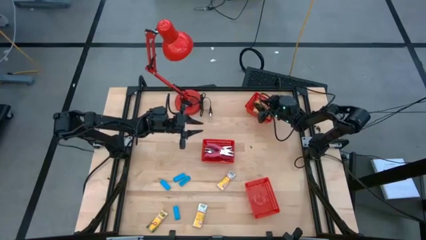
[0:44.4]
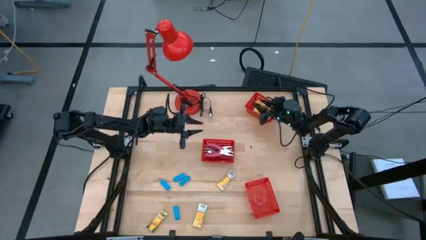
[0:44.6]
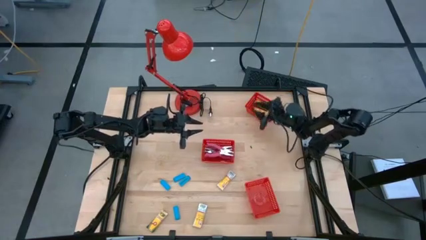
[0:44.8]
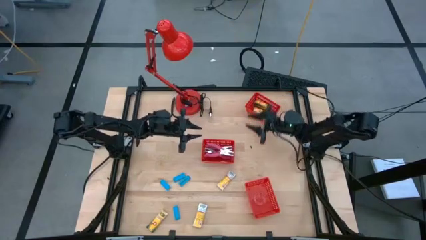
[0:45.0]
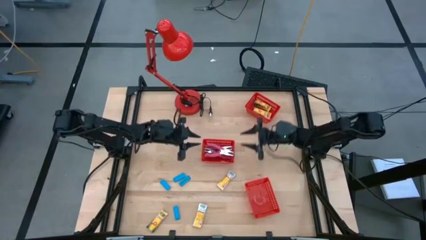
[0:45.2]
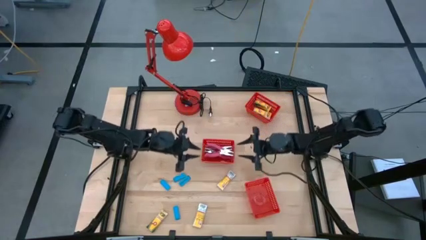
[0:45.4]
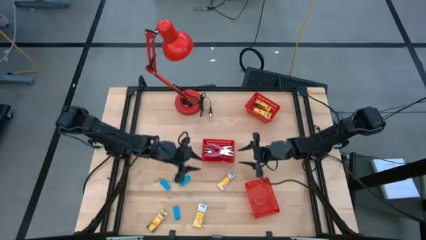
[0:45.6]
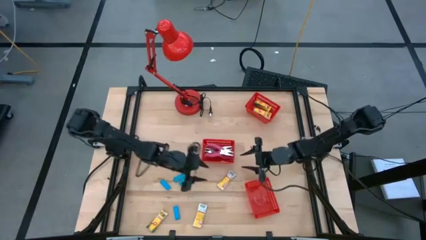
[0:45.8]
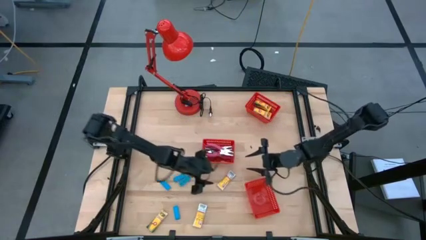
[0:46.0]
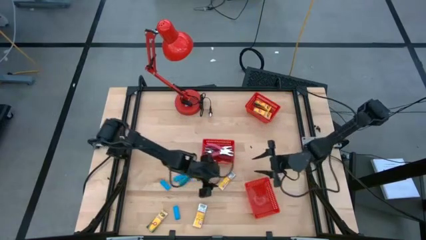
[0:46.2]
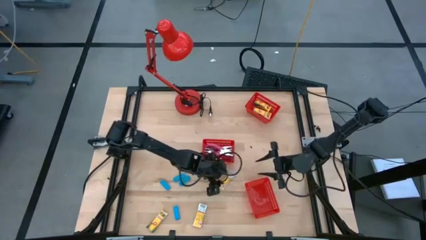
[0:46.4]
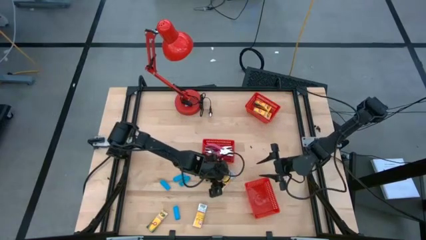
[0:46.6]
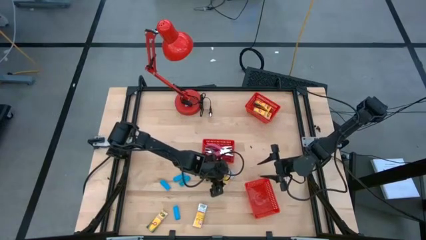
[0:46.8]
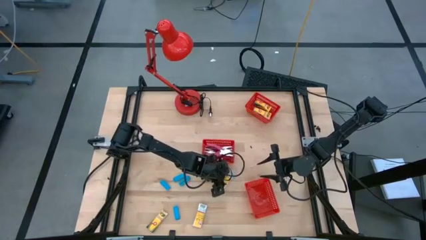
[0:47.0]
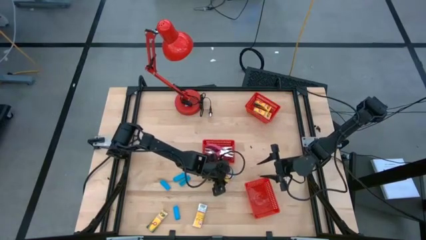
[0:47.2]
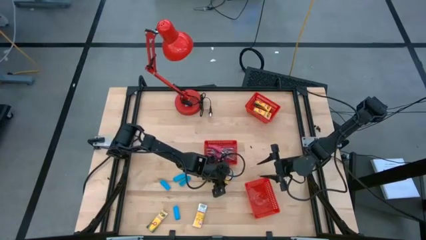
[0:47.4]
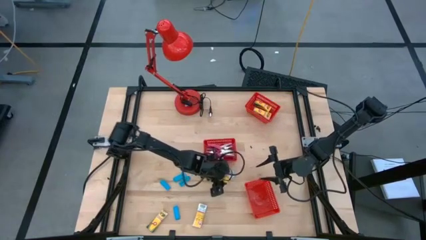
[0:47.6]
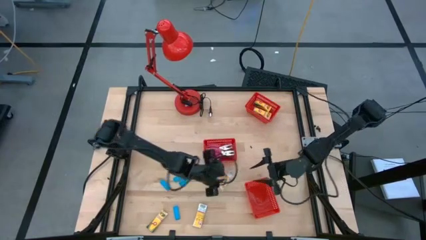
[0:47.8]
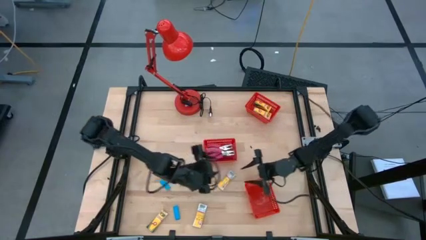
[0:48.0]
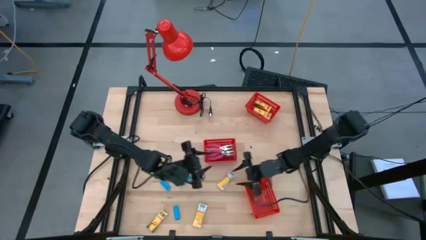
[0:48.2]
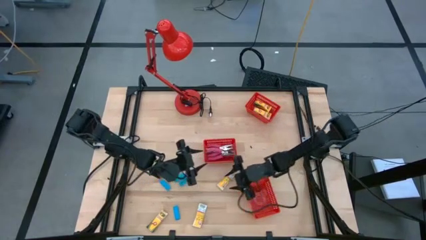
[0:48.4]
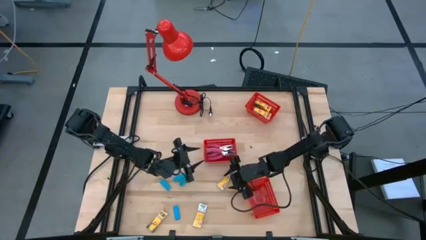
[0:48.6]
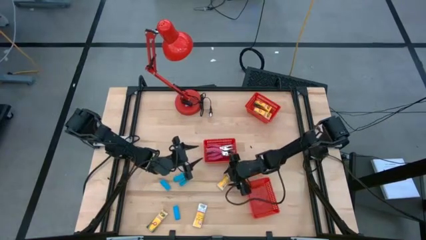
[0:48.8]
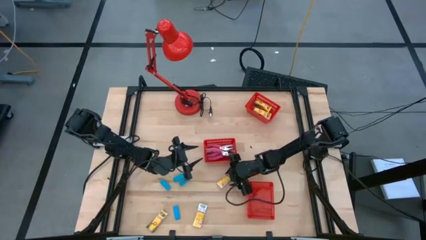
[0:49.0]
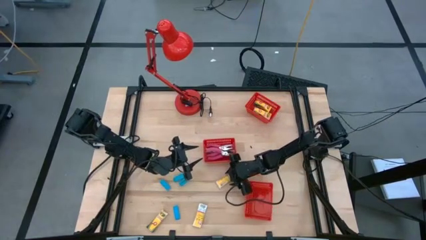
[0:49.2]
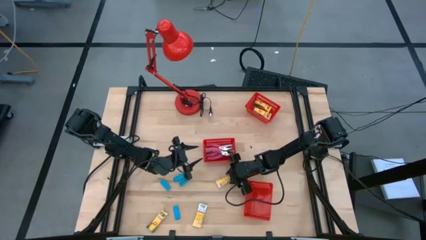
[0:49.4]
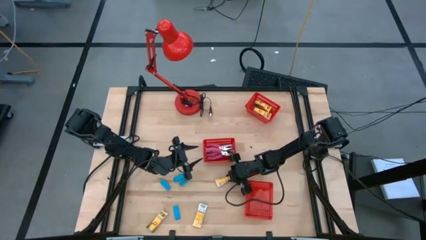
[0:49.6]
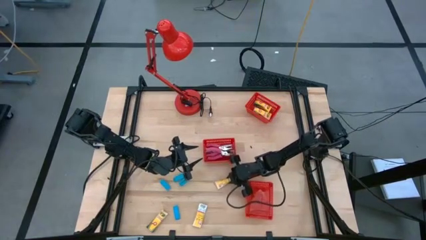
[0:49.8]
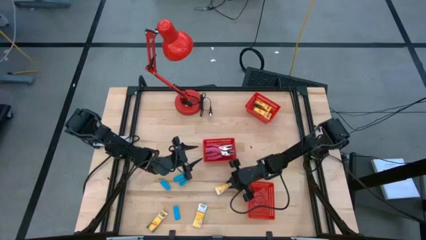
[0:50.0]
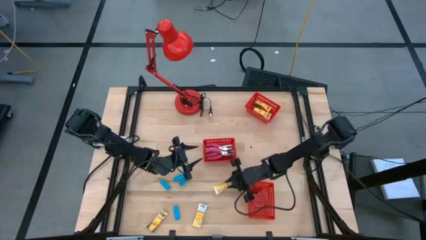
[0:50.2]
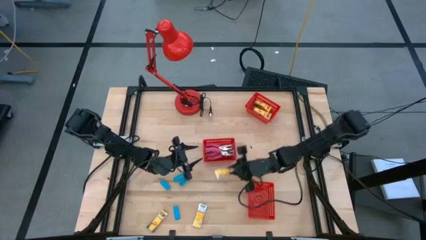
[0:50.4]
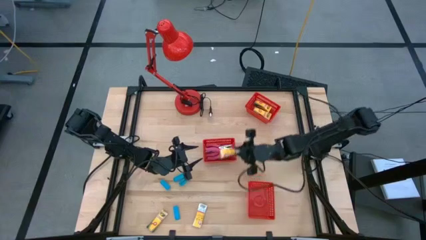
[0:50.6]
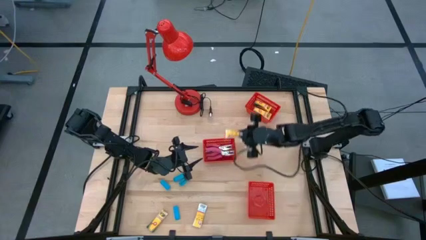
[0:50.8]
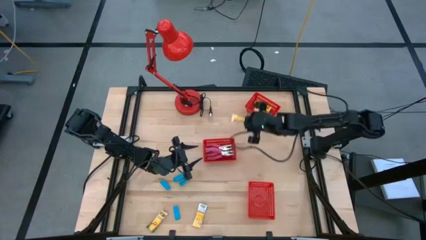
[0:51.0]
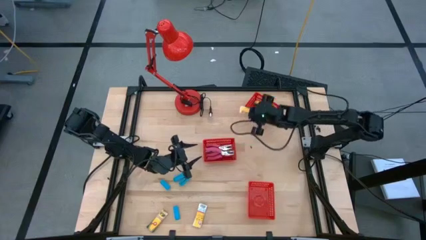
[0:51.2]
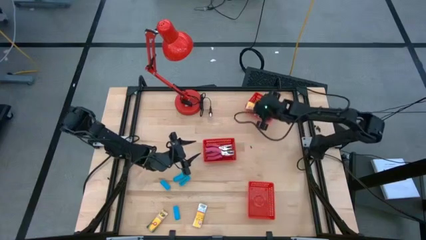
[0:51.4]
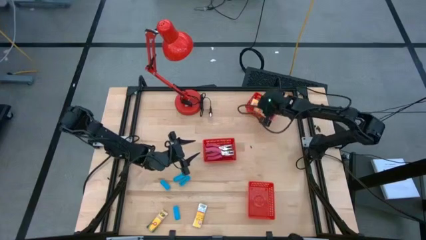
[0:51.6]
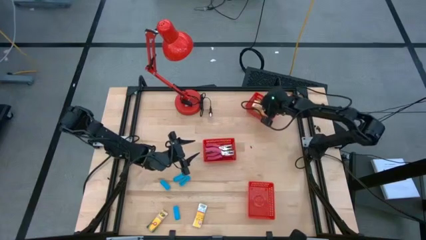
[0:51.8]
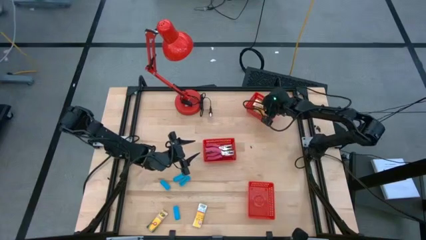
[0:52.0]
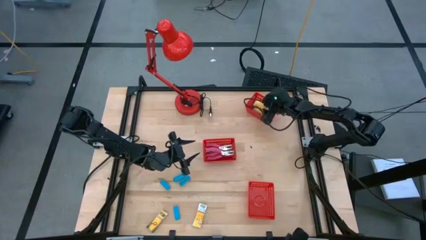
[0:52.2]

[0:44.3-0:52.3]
Task: Pick & Place School Supplies
Put the yellow crayon box into the top red bin

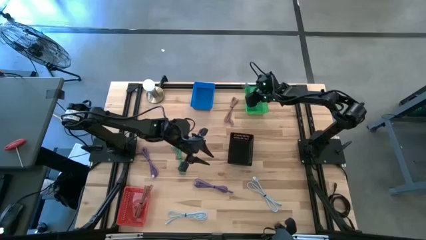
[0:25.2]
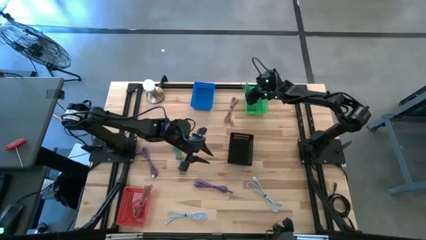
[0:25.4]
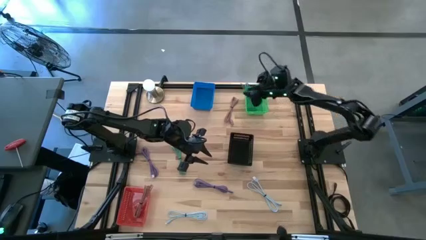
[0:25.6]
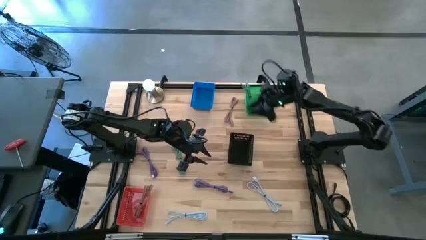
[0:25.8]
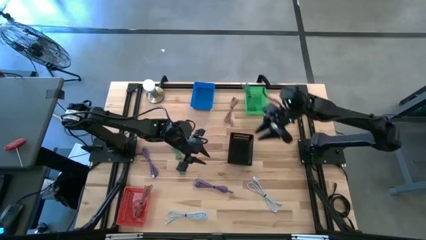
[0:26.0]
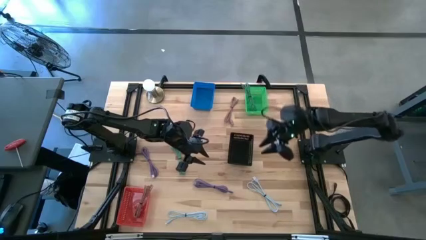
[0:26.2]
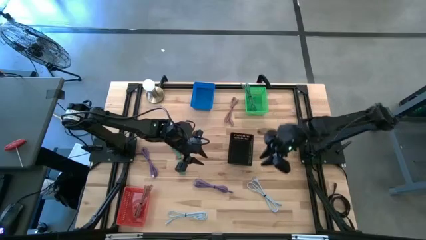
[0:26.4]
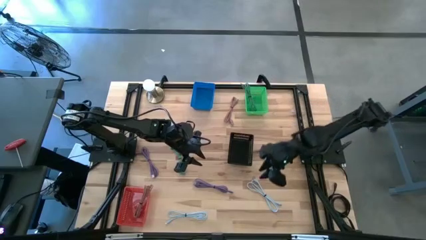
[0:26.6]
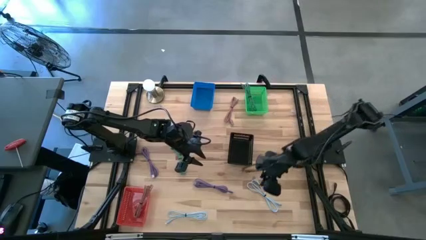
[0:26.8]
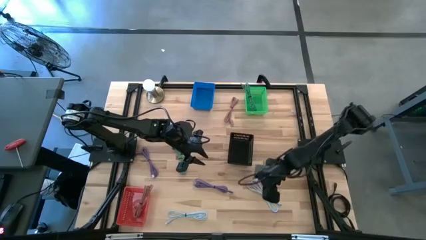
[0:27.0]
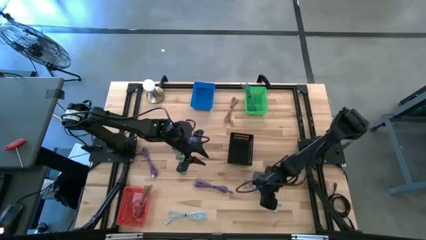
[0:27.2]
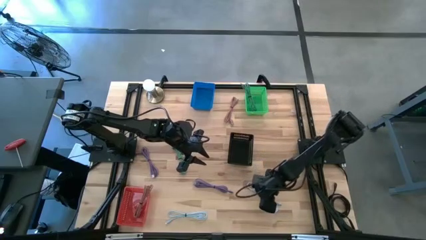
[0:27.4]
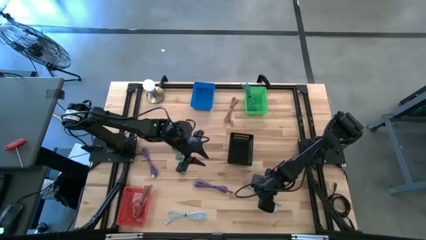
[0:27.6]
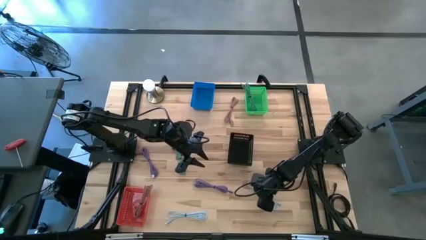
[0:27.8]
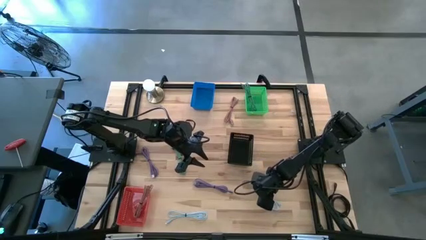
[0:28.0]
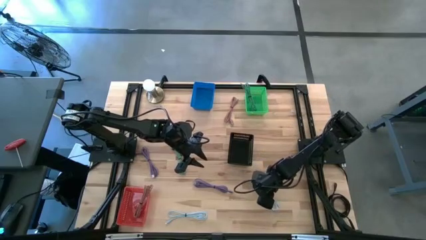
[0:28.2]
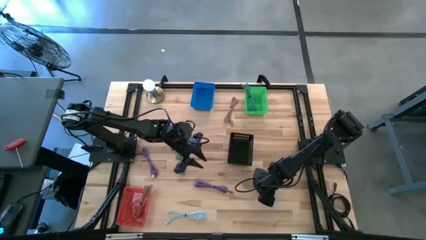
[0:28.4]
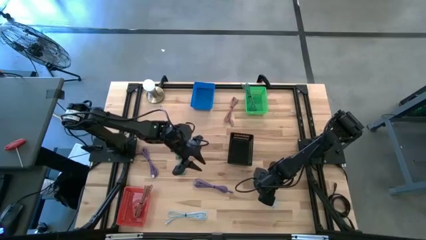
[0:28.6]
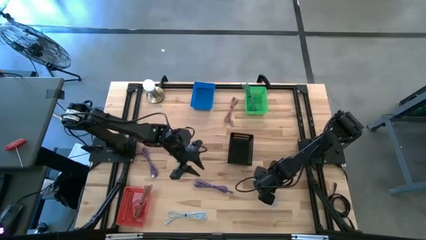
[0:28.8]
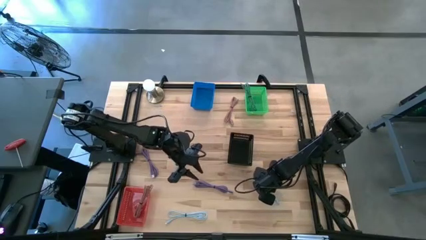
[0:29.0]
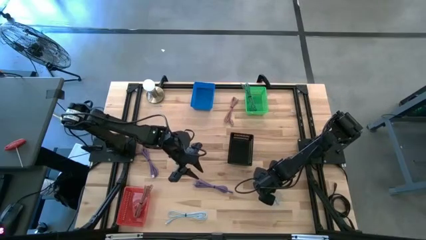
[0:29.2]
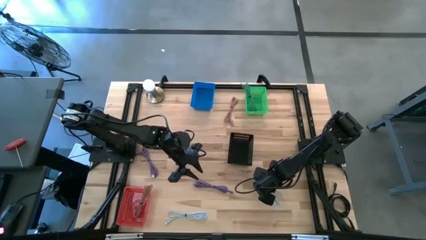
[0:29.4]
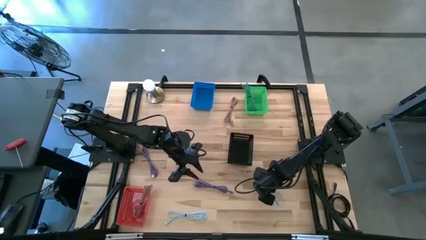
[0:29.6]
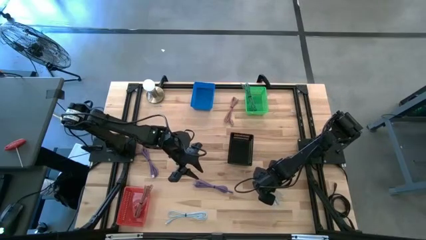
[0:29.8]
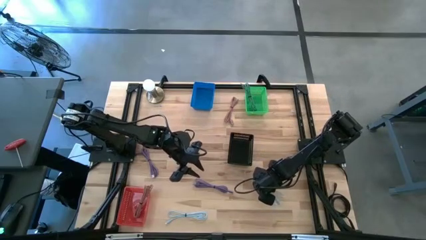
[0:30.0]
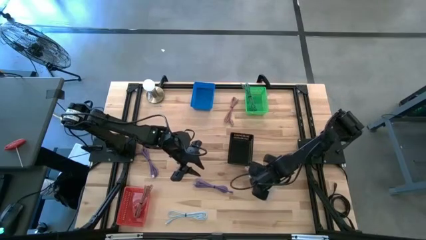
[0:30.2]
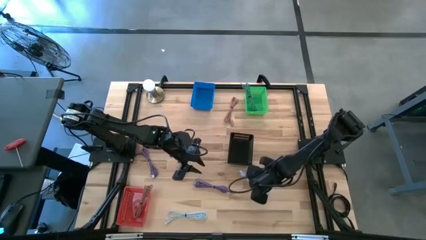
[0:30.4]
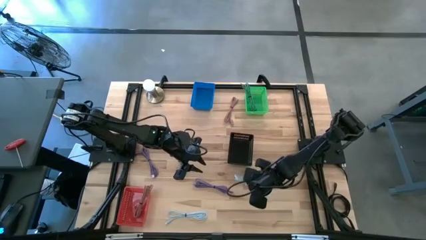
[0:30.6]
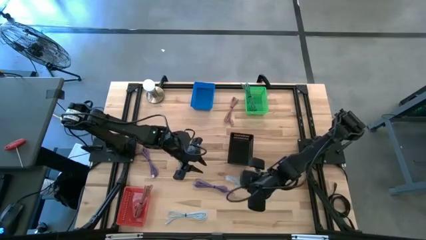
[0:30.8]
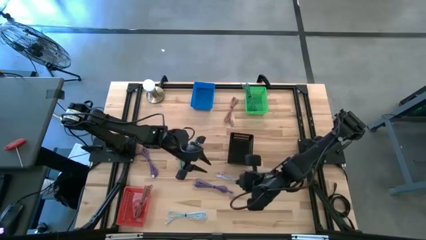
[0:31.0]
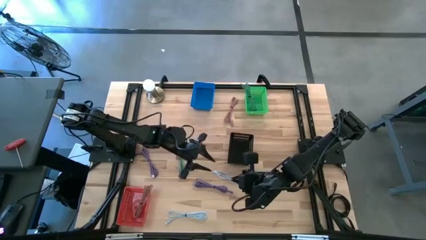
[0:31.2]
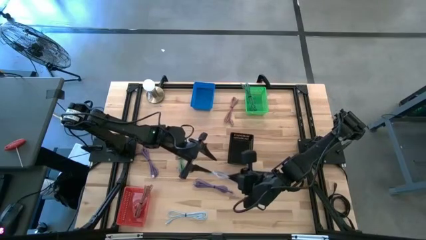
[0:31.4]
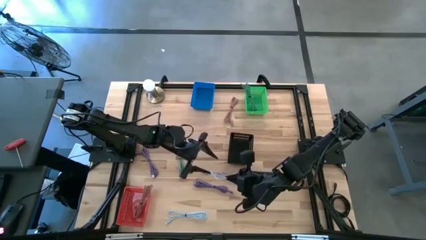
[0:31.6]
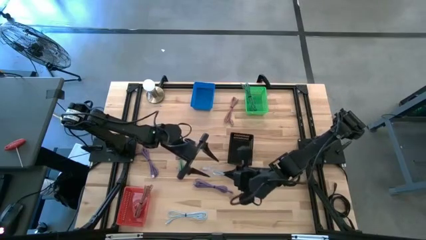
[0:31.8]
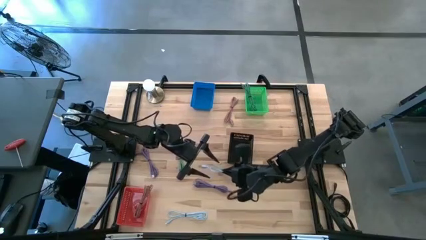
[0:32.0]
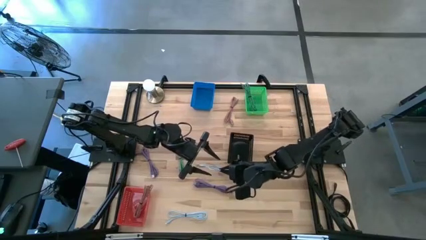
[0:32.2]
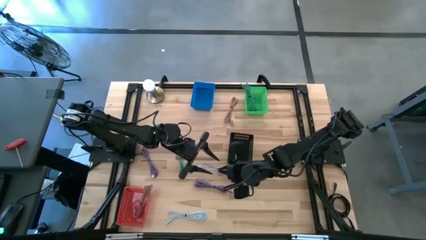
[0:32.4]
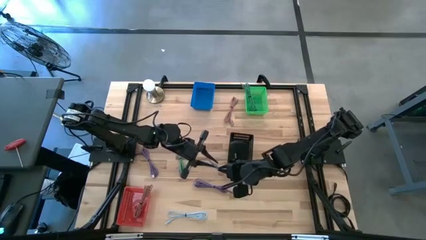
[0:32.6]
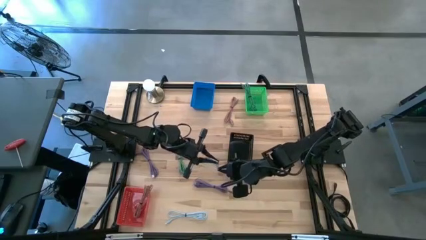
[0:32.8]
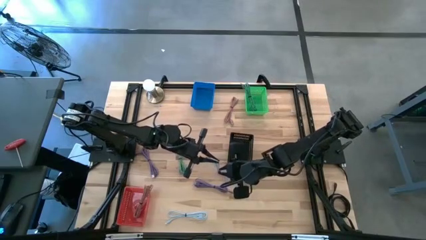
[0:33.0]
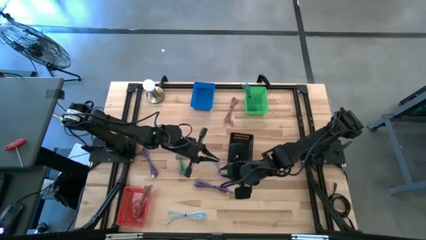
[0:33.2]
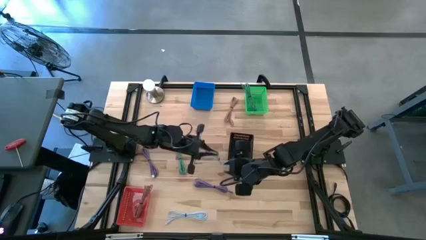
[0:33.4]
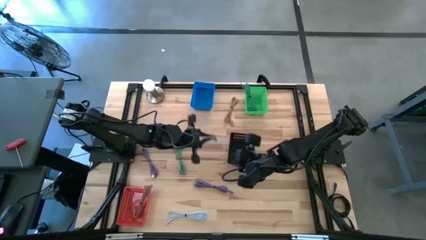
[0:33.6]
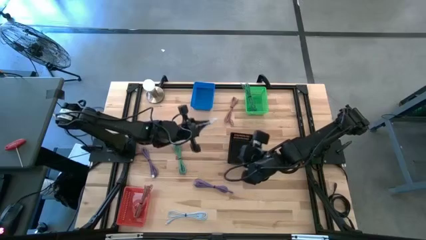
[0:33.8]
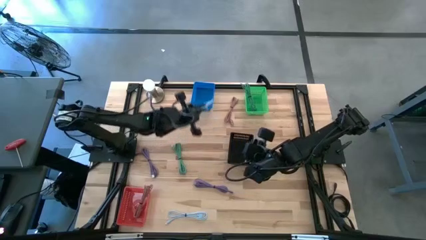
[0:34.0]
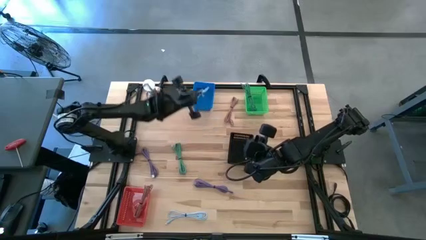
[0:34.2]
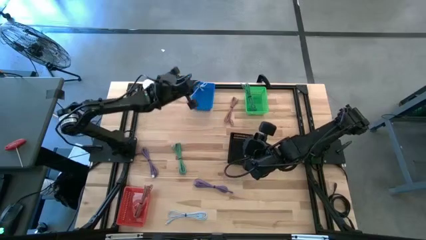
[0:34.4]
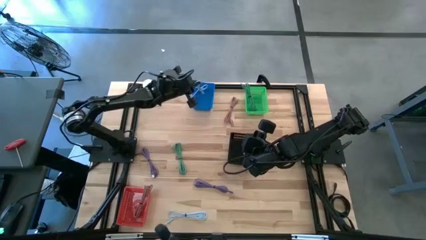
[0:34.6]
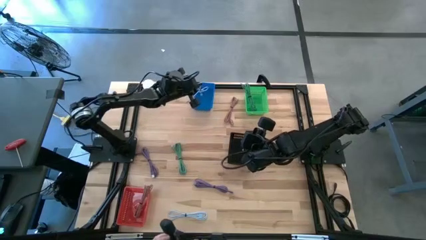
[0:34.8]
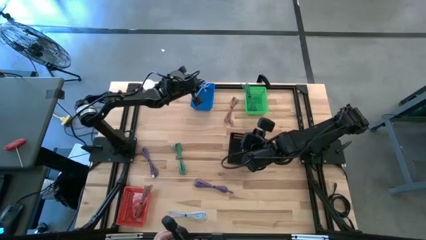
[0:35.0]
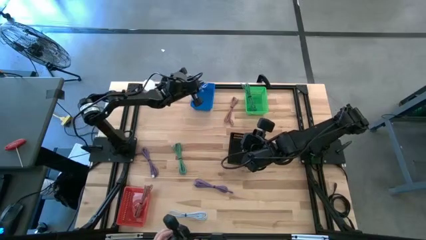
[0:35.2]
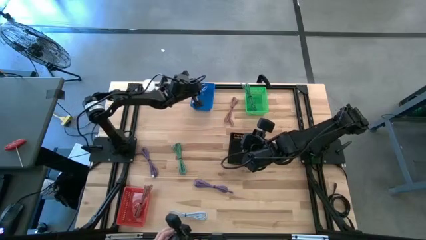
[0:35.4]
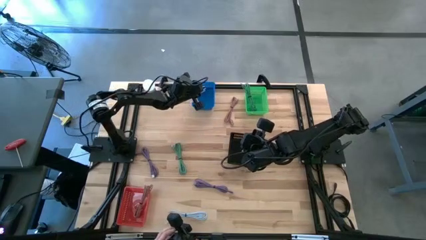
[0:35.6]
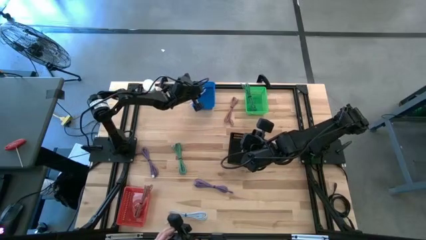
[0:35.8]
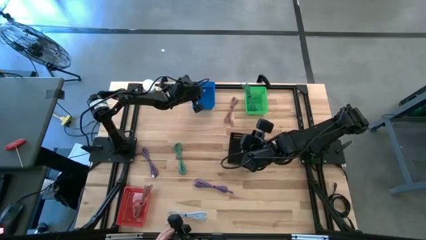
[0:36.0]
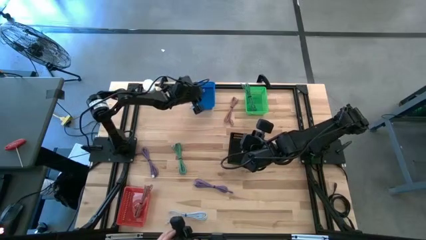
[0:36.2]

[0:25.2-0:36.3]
Task: Pick & Place USB Port
Put the right white charger cable into the blue bin
